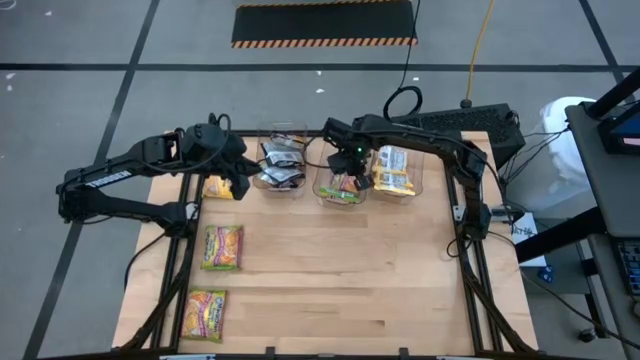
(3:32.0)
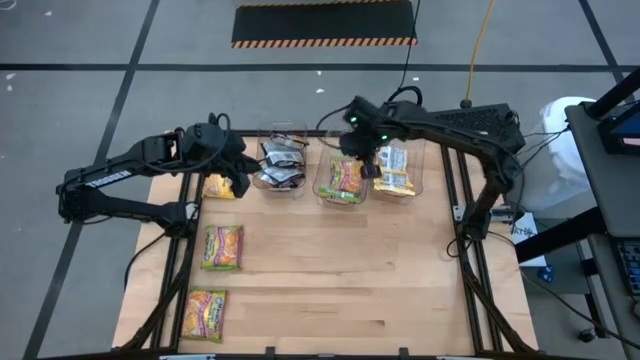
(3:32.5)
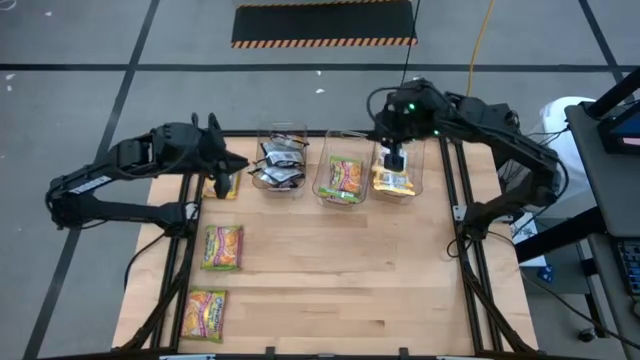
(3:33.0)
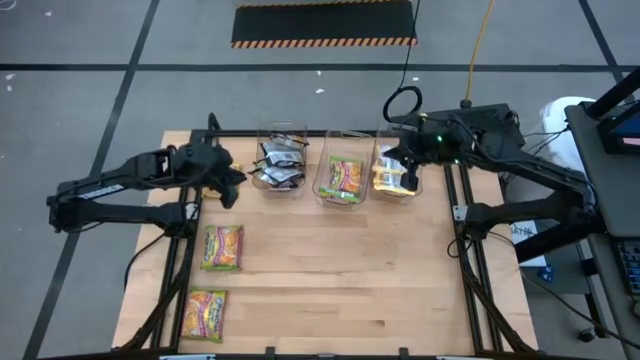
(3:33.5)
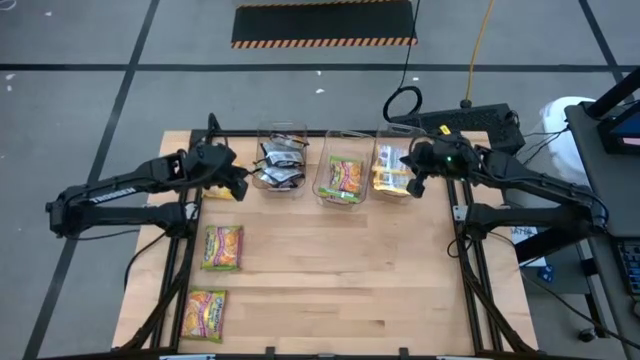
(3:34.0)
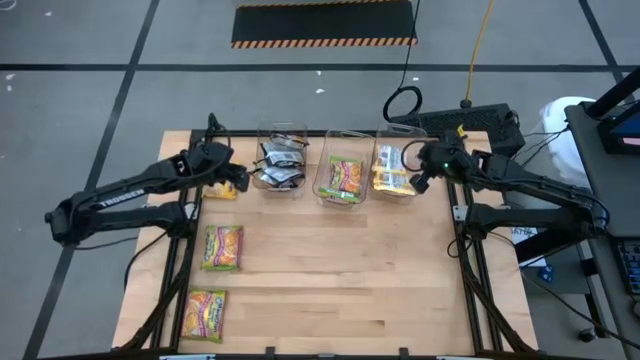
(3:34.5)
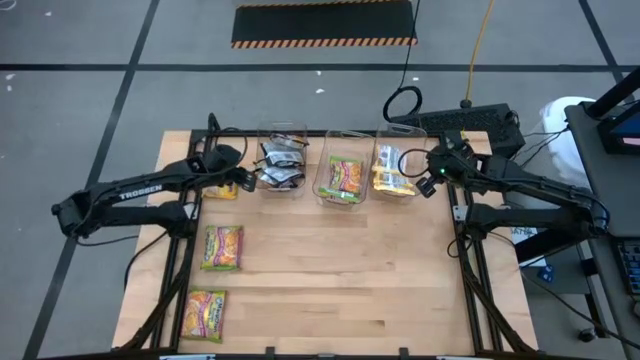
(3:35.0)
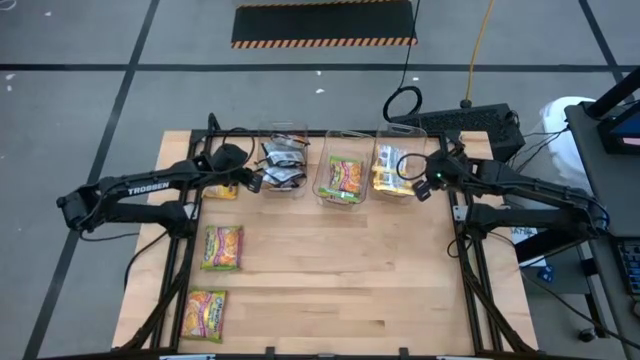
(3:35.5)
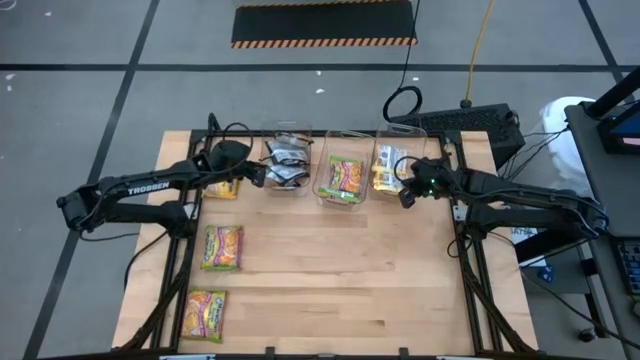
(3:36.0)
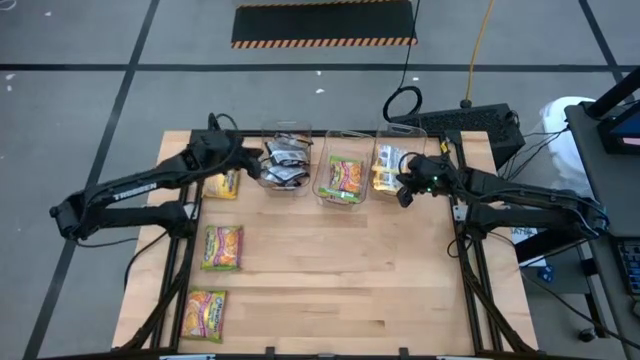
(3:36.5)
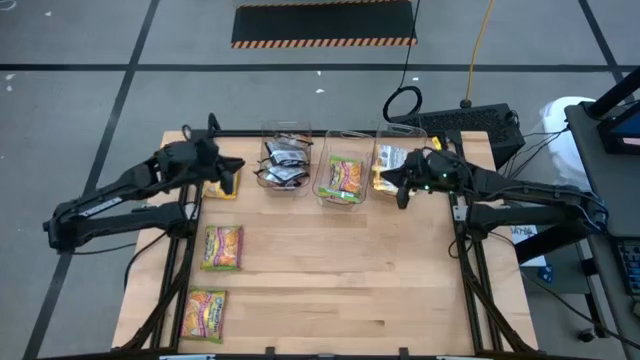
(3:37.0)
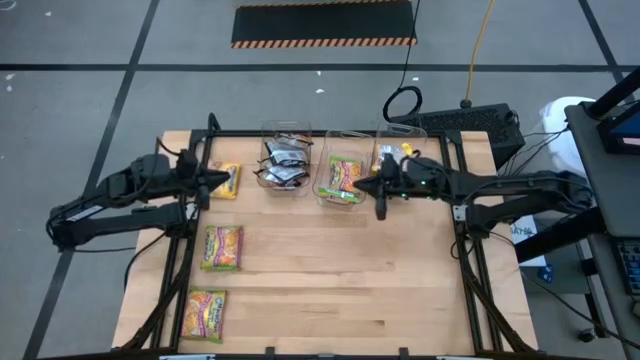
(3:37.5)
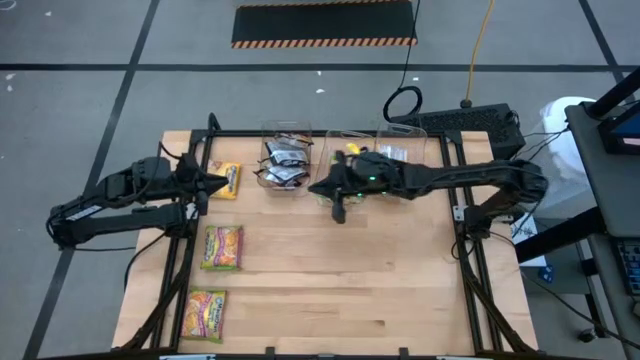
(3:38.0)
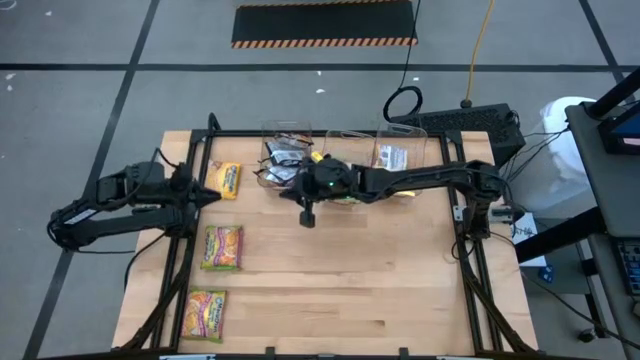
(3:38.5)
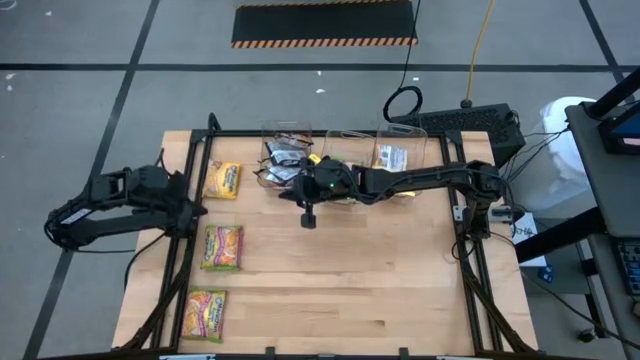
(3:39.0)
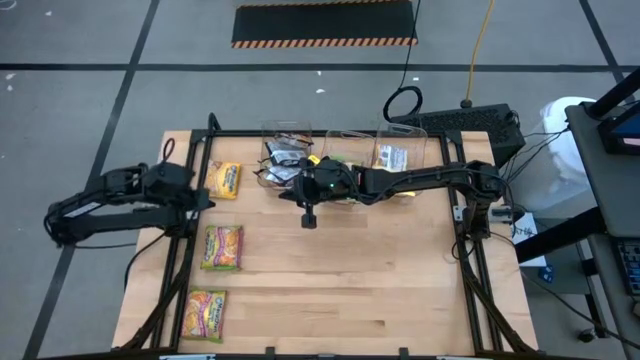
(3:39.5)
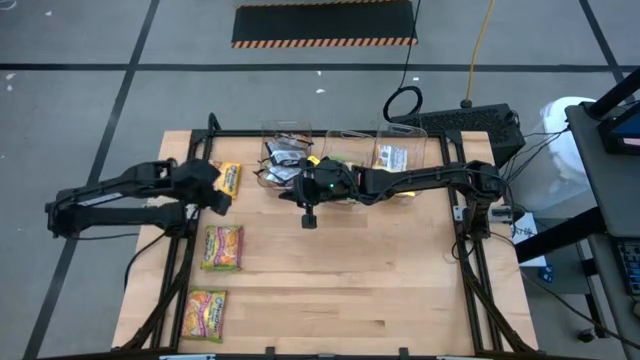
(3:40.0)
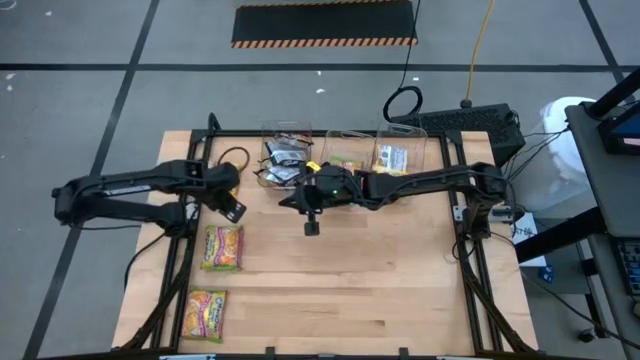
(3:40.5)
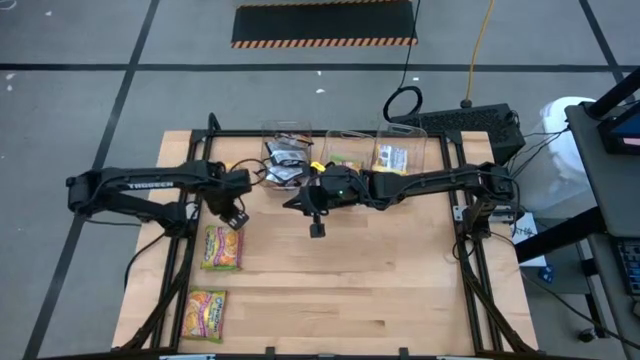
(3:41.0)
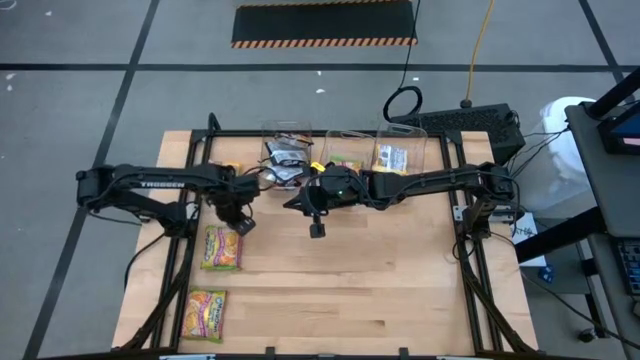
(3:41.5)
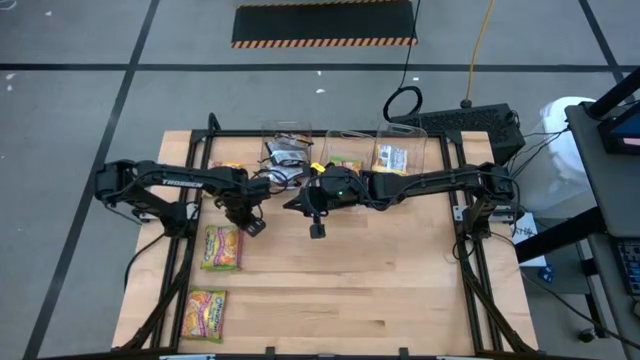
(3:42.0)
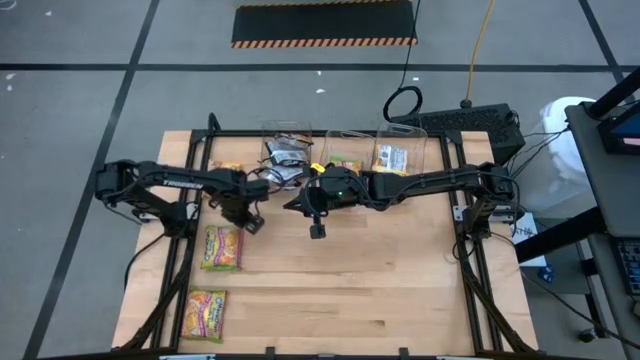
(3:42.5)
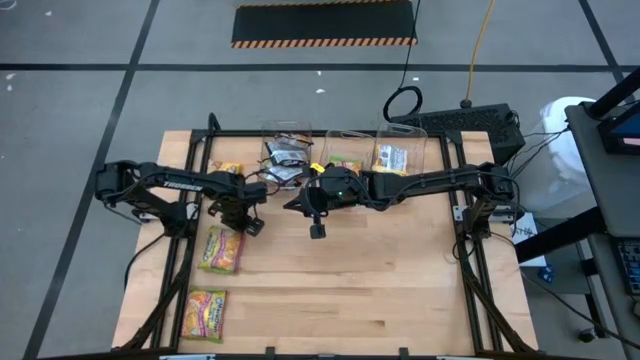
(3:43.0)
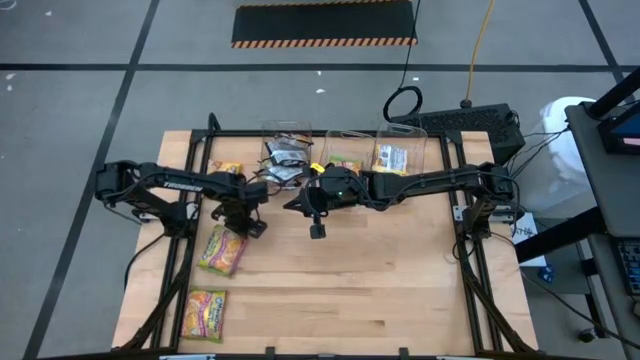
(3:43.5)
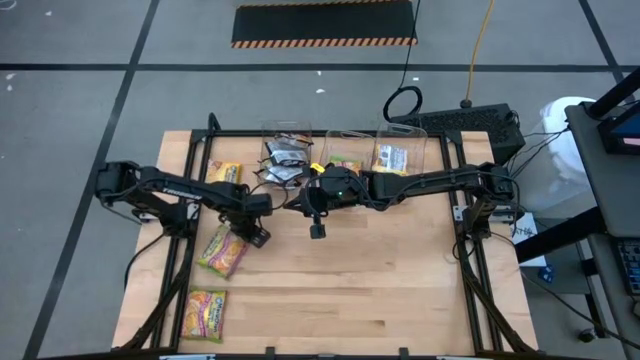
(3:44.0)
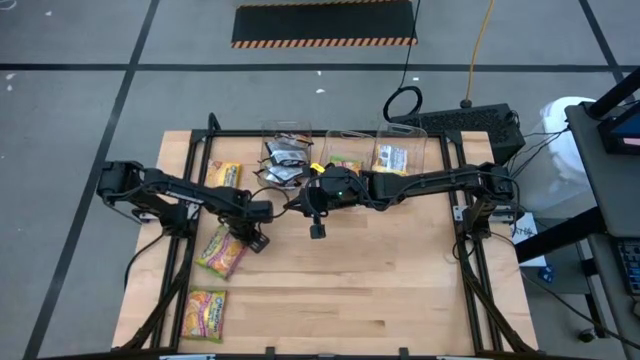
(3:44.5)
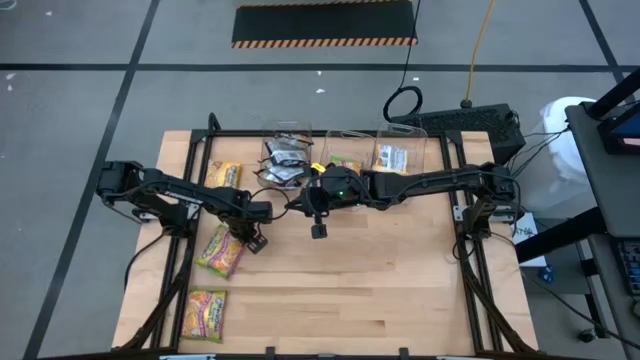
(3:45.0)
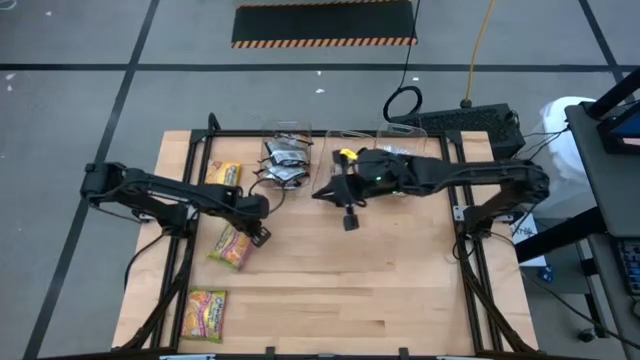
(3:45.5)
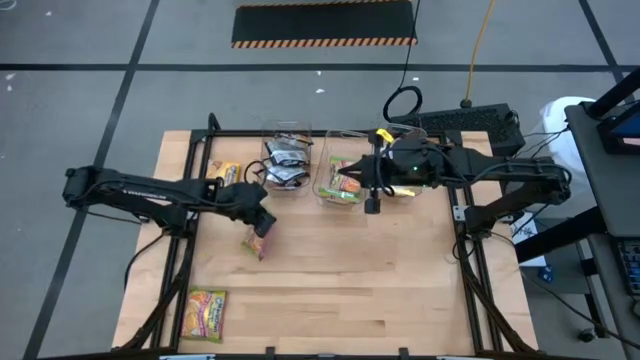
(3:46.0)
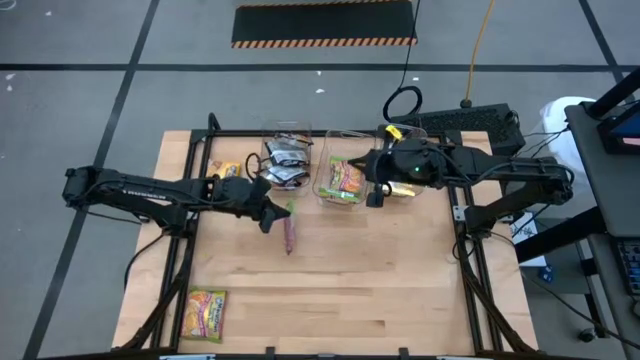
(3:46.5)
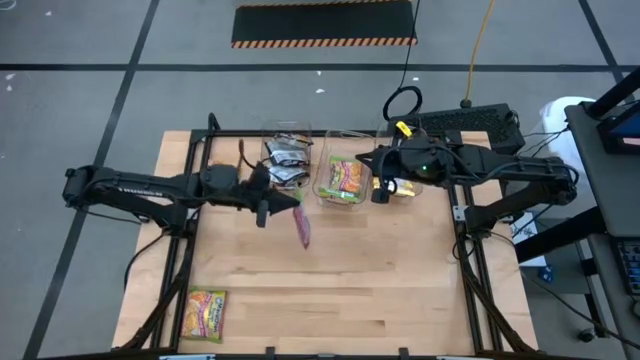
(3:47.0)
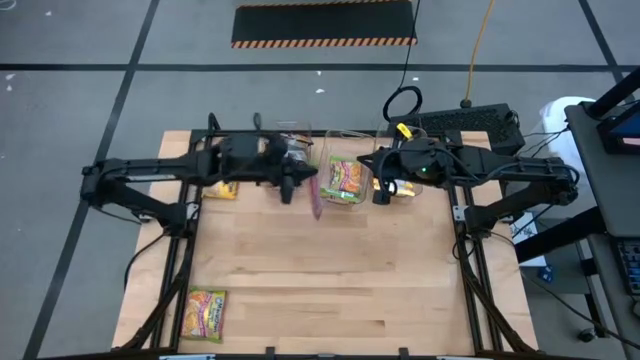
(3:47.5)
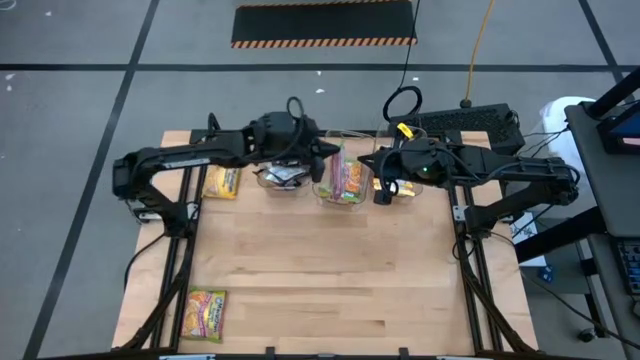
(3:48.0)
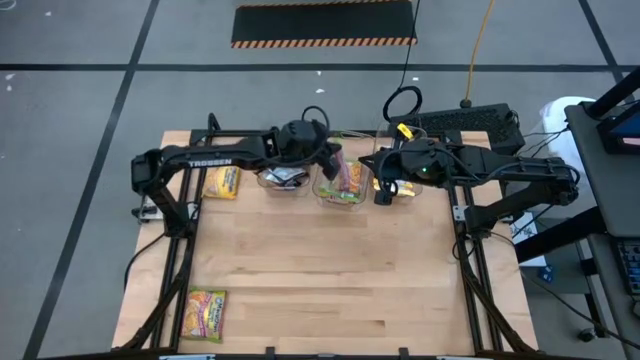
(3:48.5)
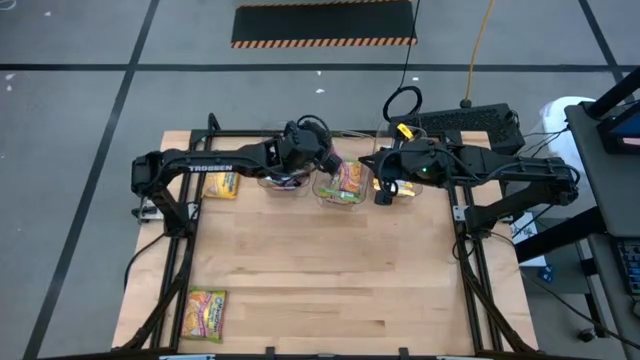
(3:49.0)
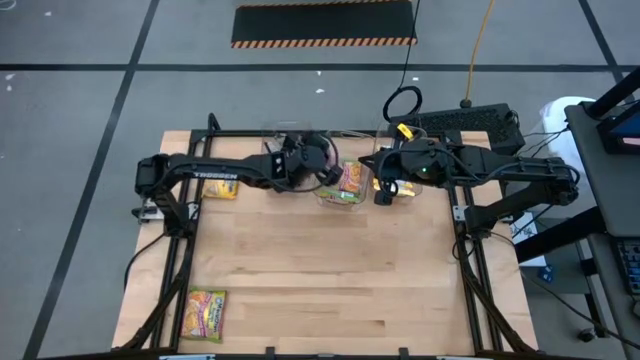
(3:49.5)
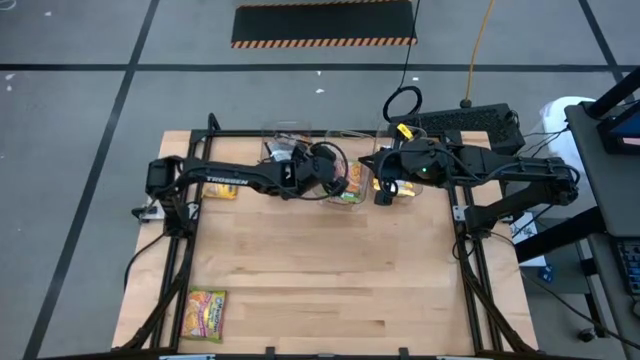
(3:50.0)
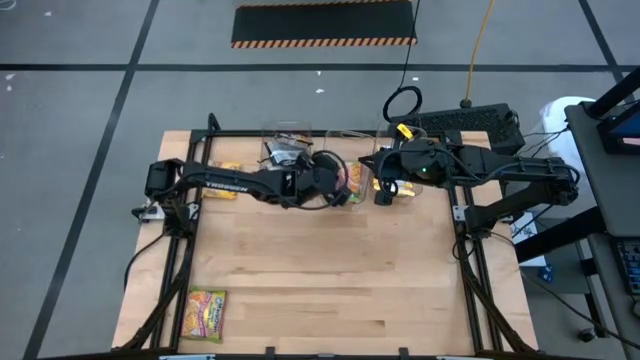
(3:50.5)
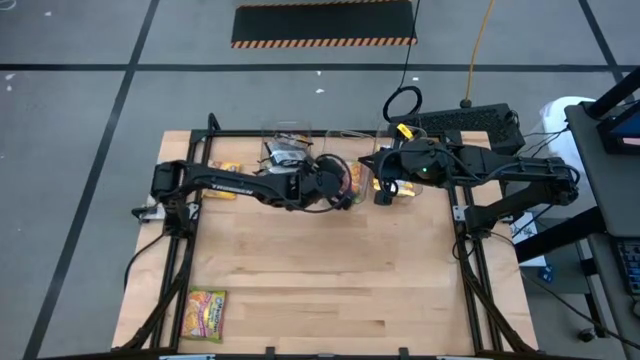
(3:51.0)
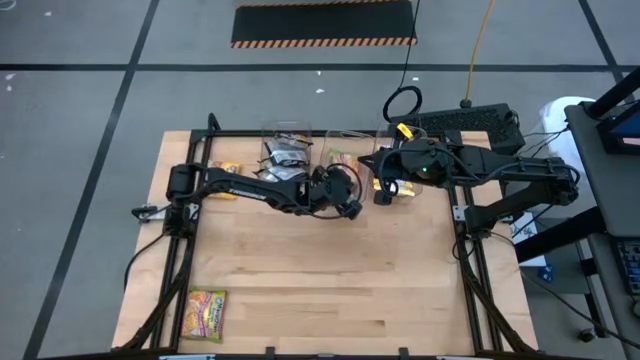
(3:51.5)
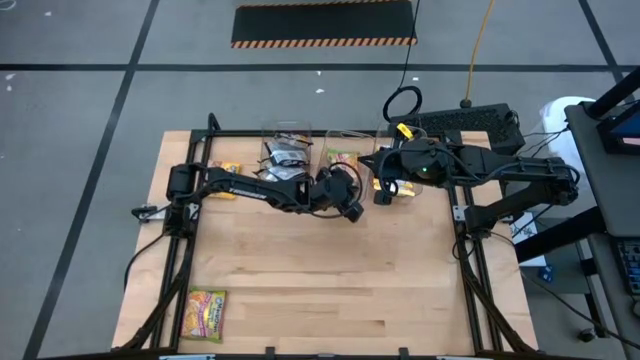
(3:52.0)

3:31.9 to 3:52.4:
Task: Sort Maruchan noodles
Put the green noodle pack into the middle transparent bin
